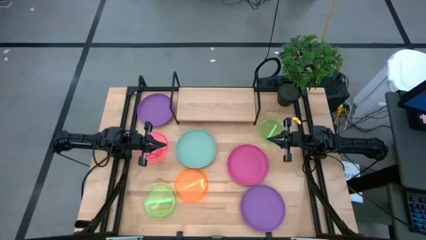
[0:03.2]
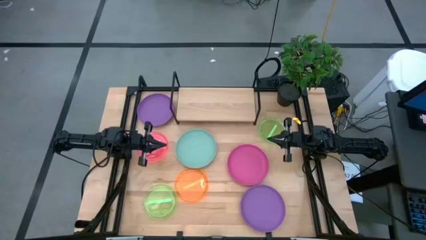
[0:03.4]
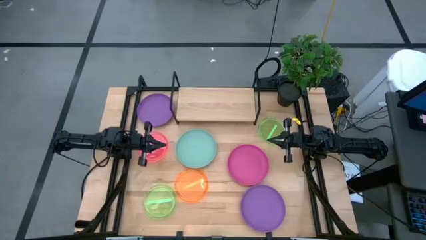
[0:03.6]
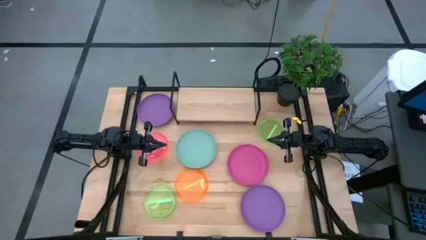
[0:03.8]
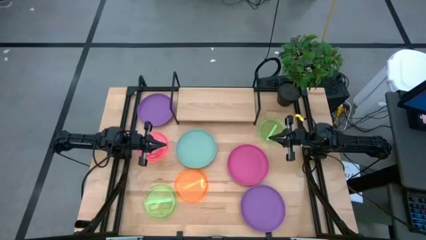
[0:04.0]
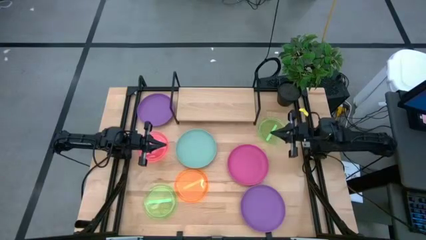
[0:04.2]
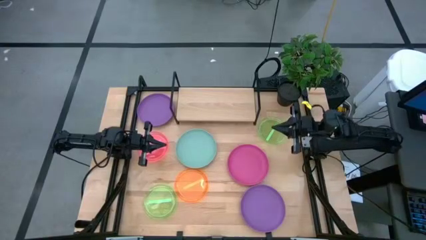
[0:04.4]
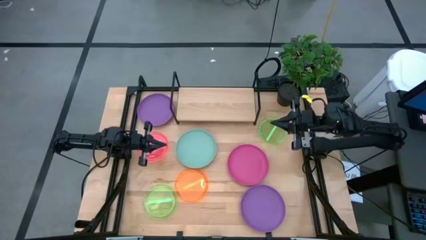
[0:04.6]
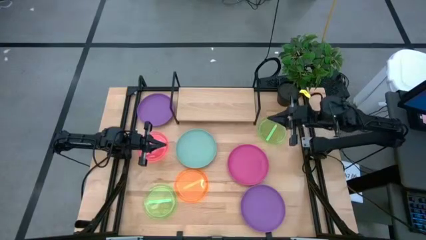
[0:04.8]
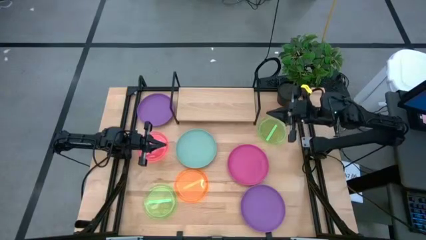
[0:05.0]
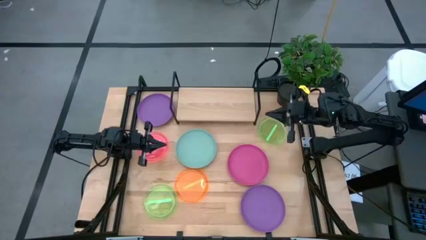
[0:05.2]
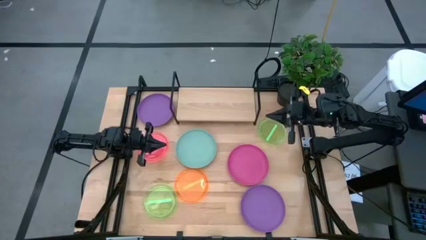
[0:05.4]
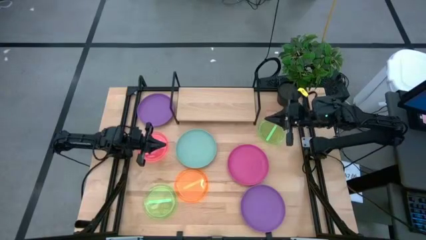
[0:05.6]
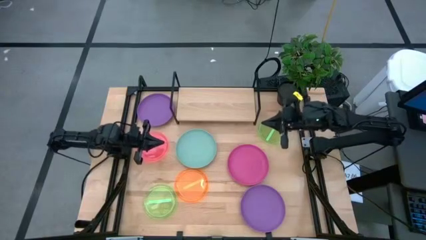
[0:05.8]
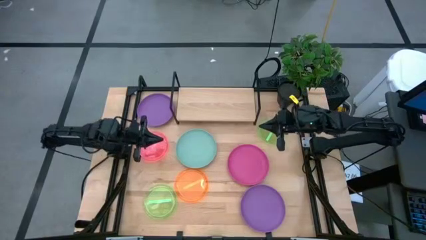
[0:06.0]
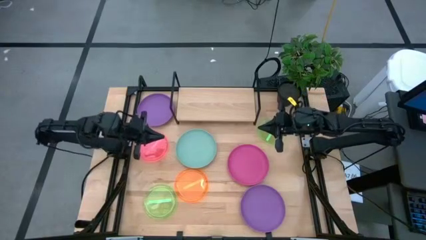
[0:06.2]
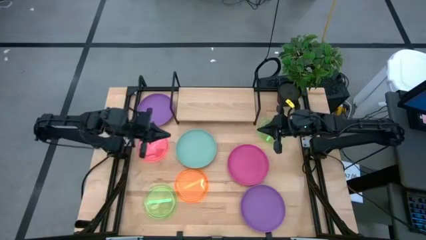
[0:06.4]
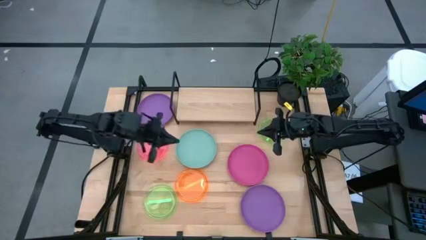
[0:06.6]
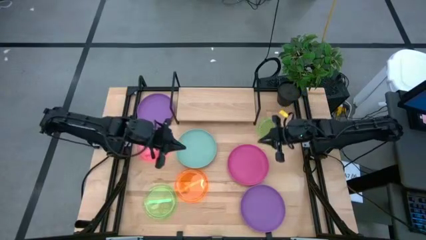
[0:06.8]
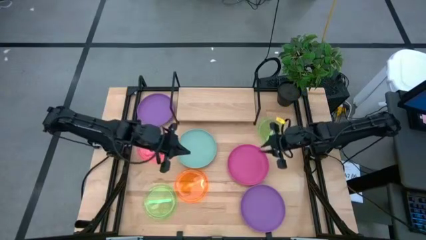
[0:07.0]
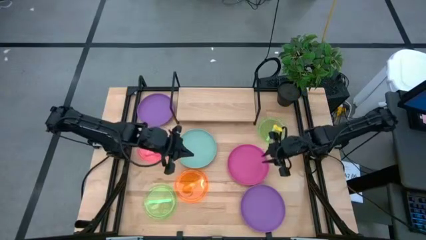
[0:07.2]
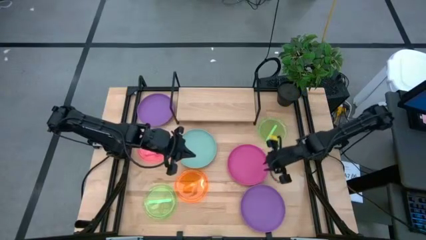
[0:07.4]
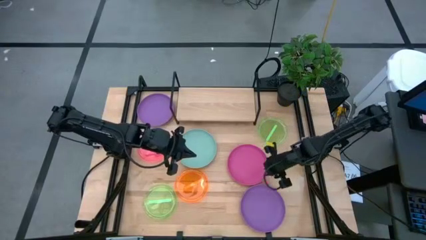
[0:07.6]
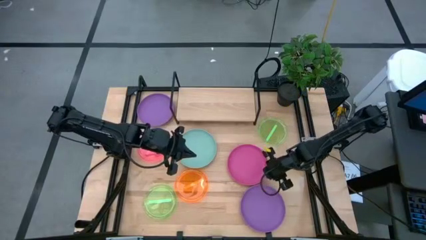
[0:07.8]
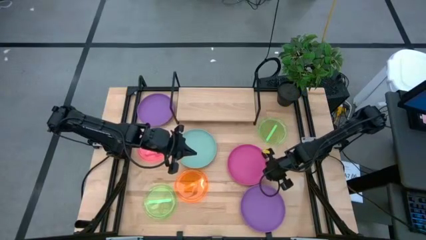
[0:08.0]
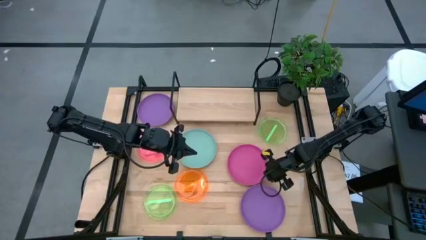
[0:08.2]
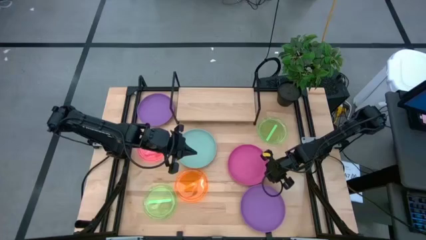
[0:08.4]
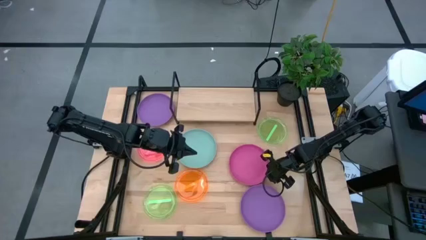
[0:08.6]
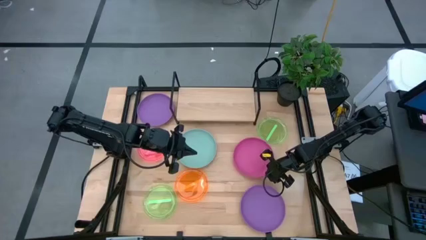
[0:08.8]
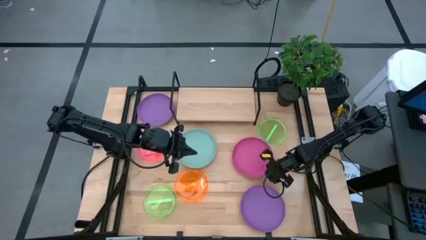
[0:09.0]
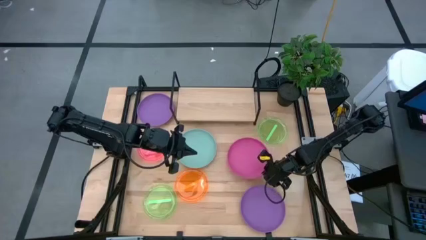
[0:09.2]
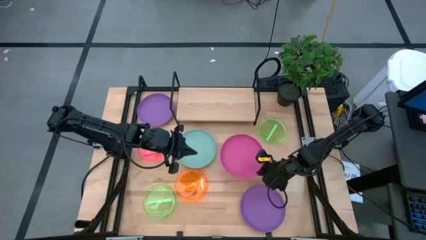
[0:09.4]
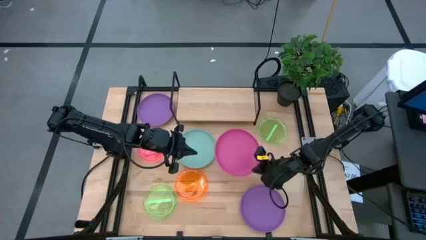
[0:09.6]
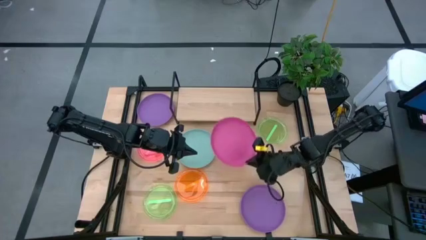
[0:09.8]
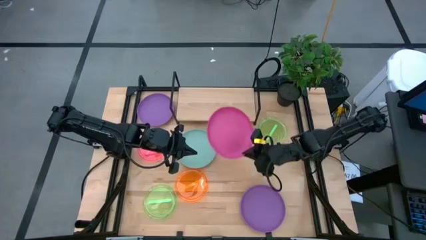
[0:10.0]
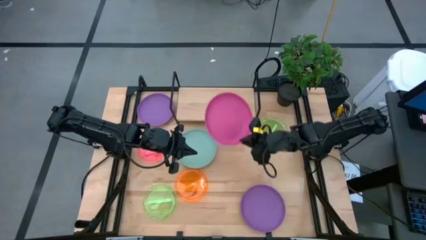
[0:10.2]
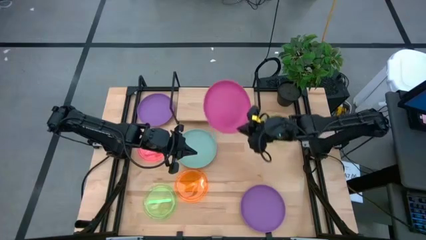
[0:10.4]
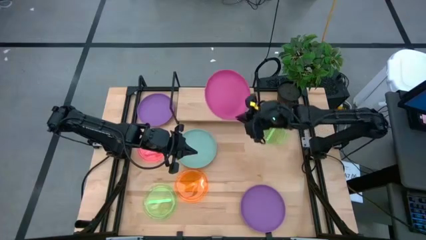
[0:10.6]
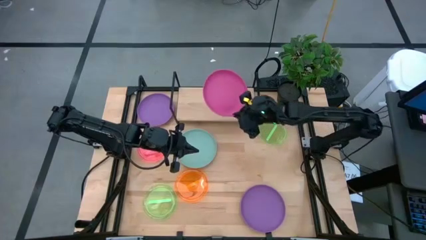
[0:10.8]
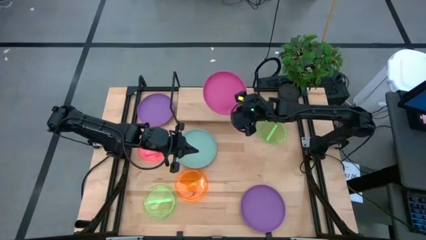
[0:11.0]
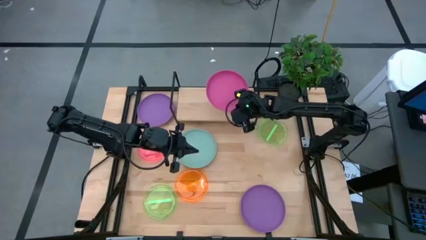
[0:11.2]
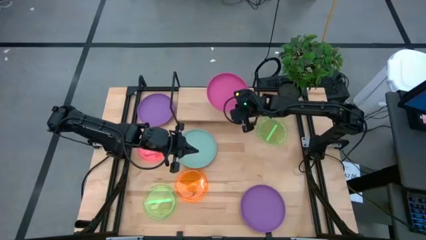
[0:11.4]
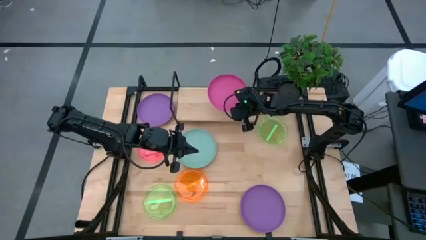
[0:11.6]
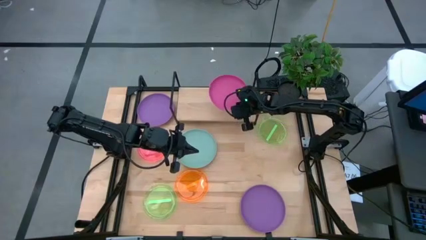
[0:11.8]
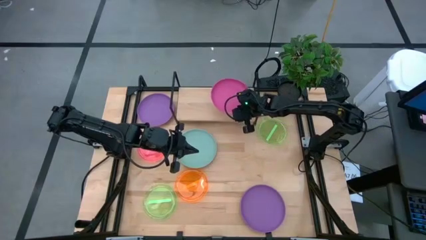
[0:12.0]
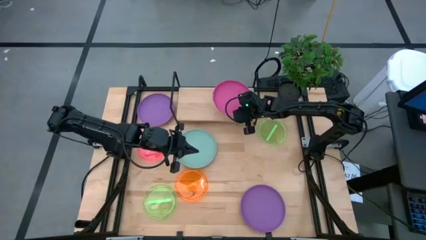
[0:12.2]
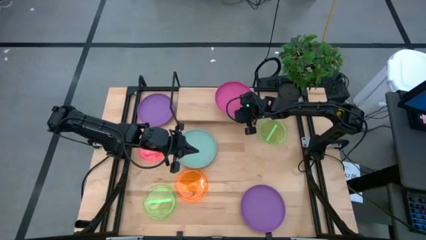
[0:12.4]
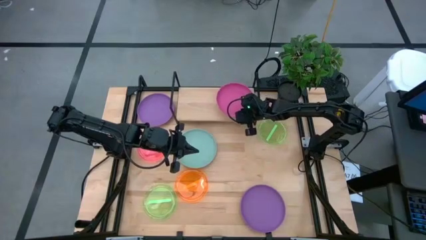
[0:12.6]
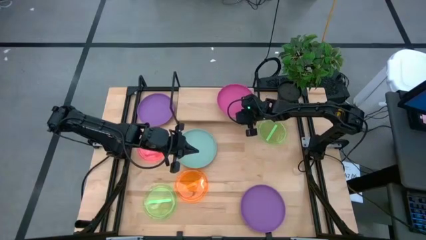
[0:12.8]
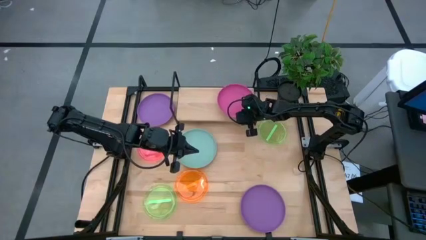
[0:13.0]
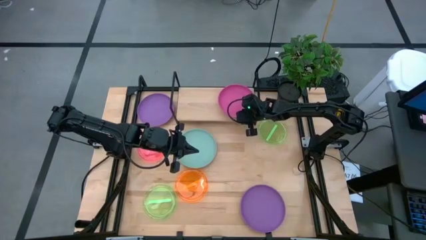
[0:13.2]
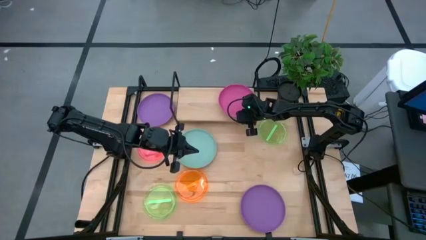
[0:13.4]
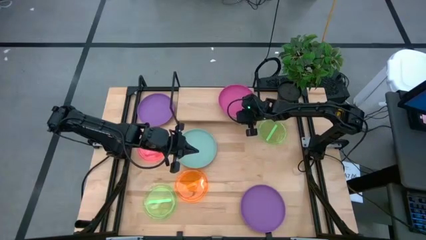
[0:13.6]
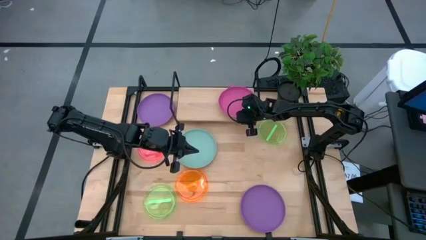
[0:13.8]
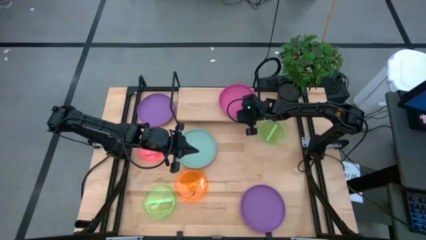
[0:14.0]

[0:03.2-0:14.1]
Task: Place and stack plates onto a shelf
Put the large pink plate on the shelf
